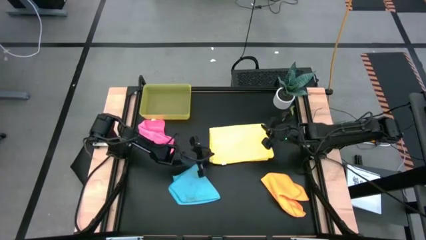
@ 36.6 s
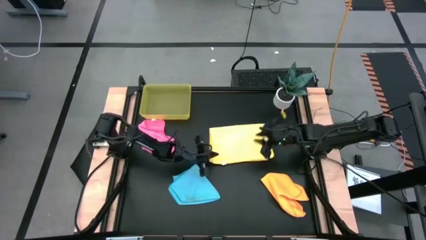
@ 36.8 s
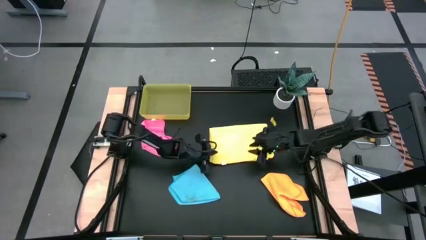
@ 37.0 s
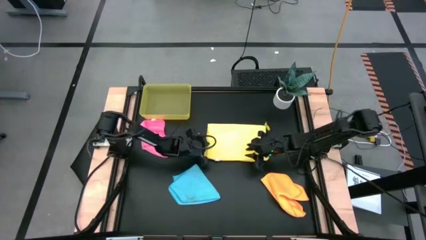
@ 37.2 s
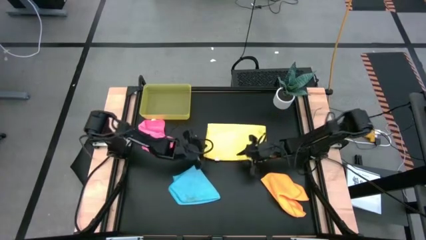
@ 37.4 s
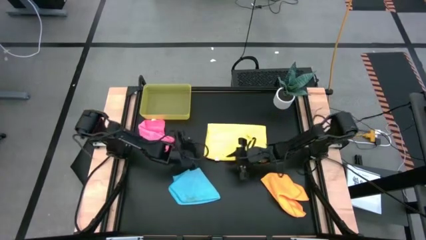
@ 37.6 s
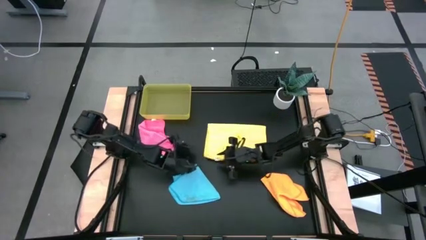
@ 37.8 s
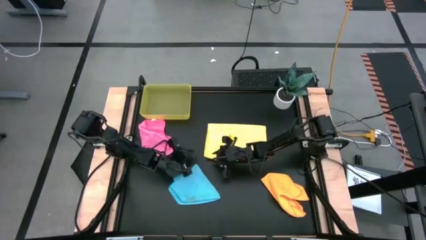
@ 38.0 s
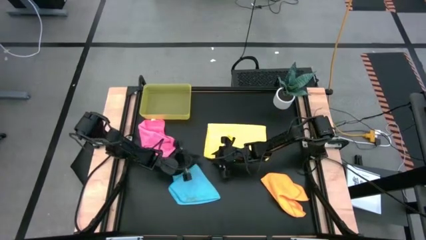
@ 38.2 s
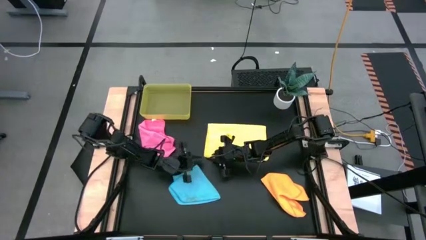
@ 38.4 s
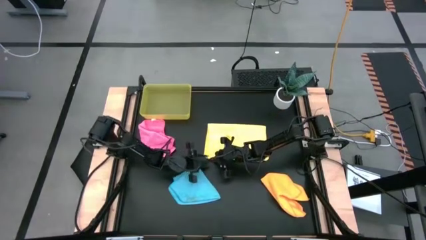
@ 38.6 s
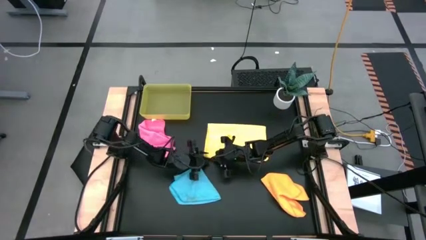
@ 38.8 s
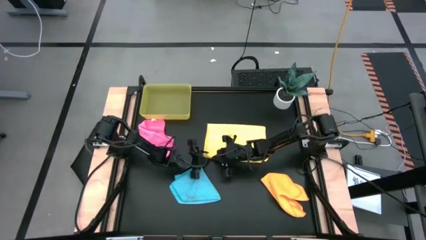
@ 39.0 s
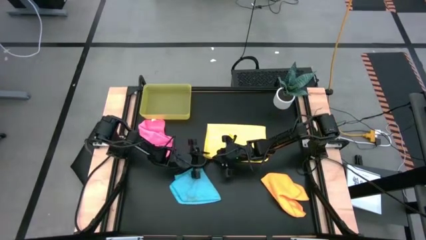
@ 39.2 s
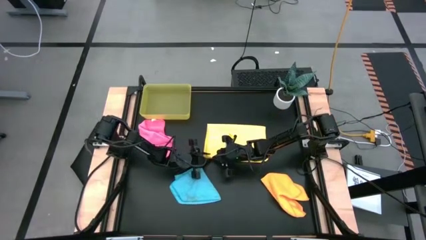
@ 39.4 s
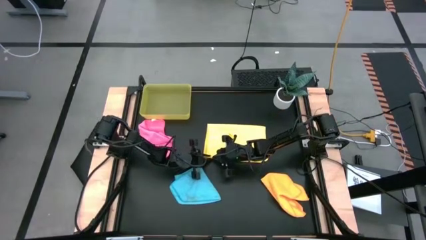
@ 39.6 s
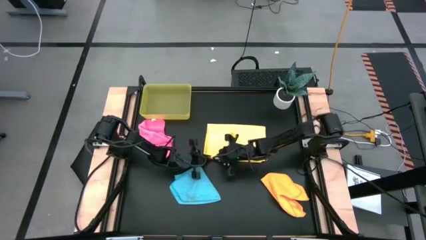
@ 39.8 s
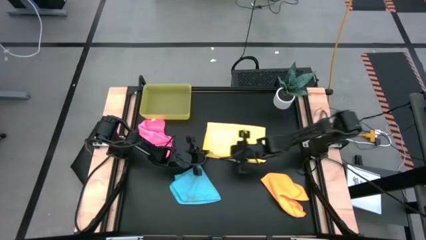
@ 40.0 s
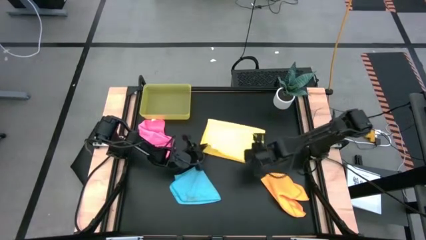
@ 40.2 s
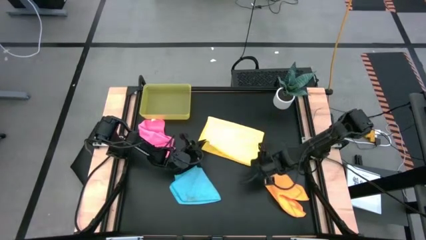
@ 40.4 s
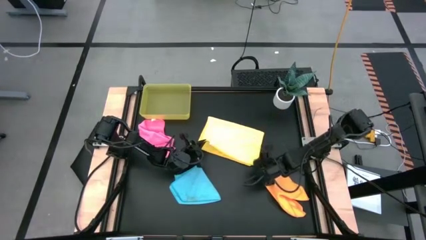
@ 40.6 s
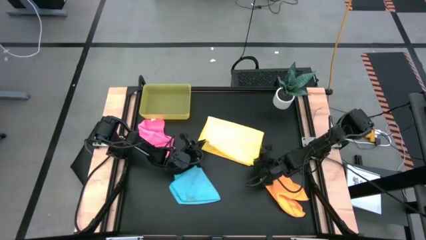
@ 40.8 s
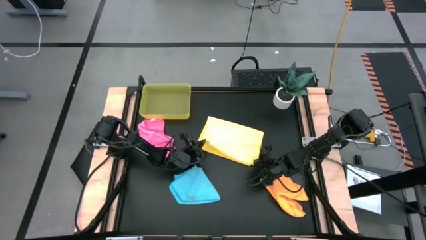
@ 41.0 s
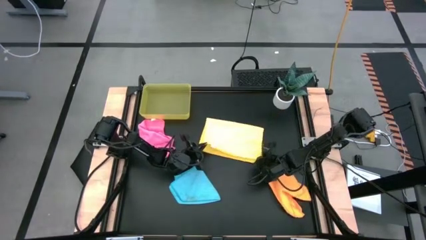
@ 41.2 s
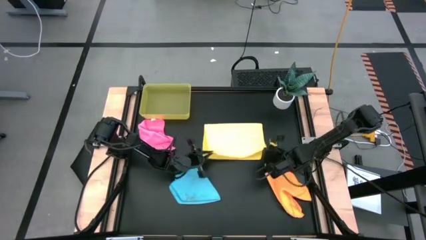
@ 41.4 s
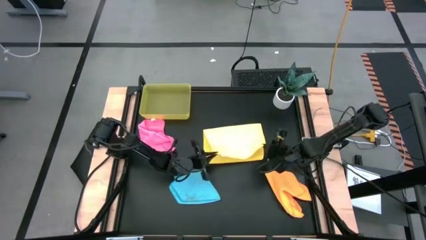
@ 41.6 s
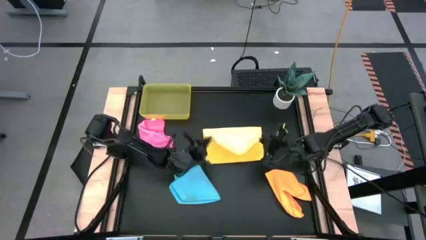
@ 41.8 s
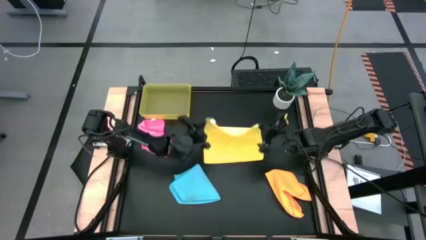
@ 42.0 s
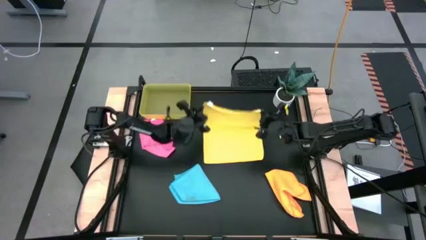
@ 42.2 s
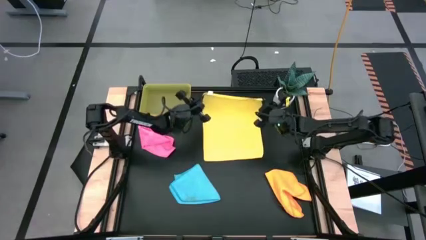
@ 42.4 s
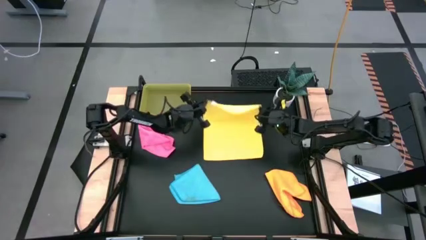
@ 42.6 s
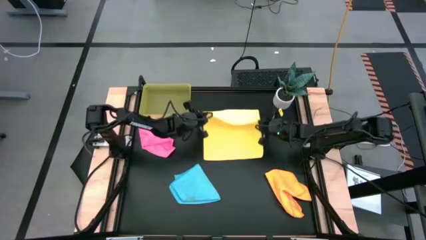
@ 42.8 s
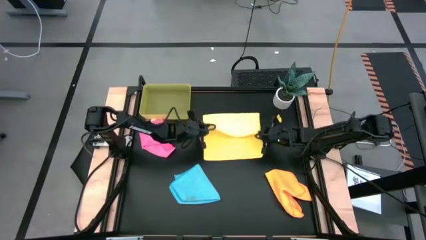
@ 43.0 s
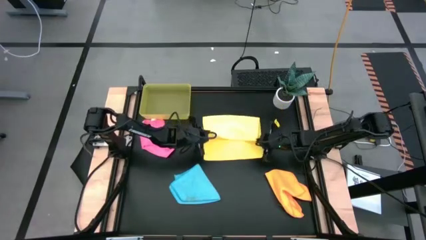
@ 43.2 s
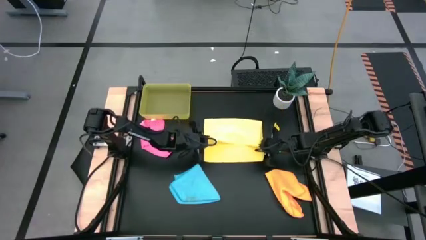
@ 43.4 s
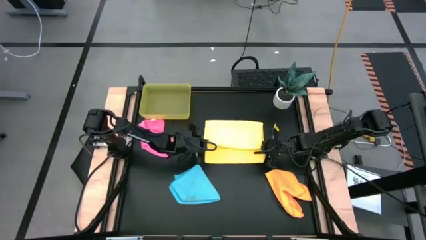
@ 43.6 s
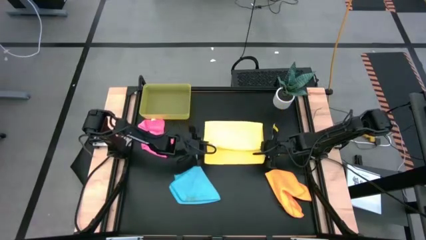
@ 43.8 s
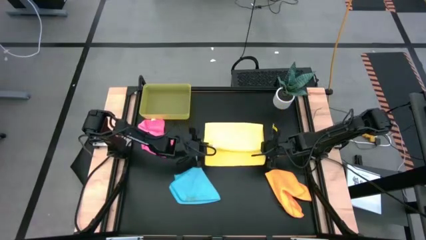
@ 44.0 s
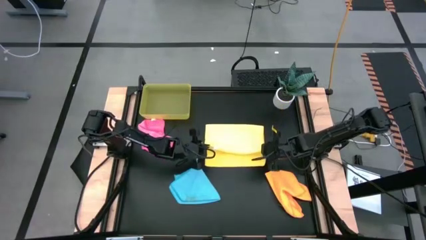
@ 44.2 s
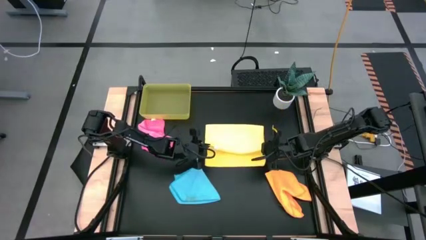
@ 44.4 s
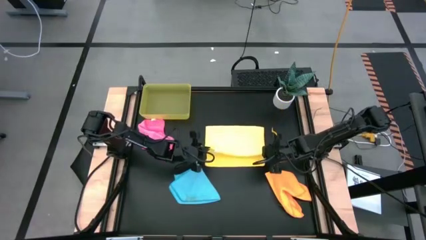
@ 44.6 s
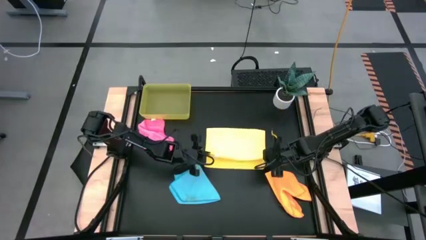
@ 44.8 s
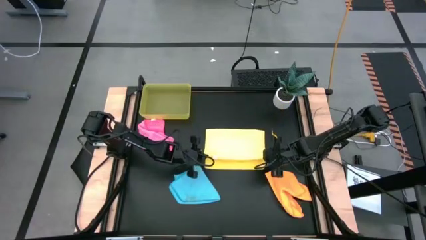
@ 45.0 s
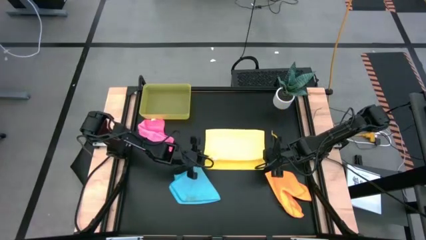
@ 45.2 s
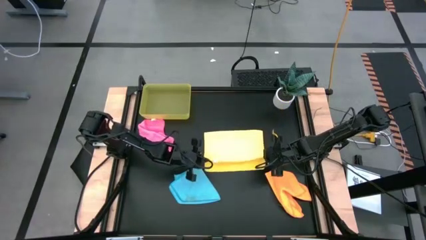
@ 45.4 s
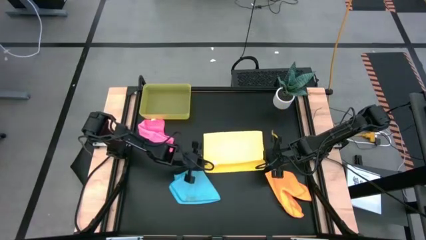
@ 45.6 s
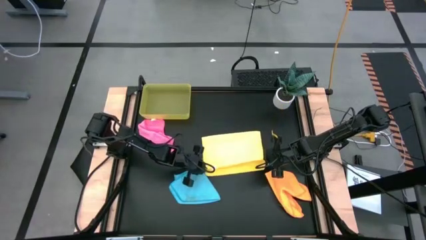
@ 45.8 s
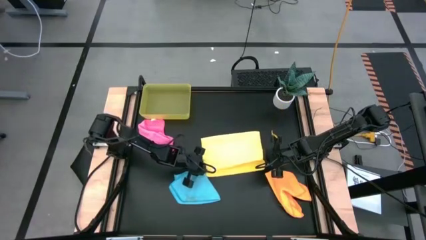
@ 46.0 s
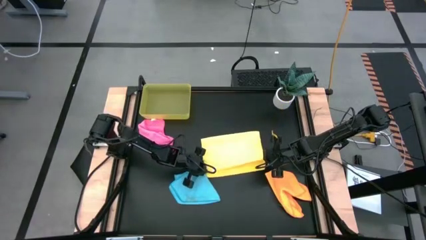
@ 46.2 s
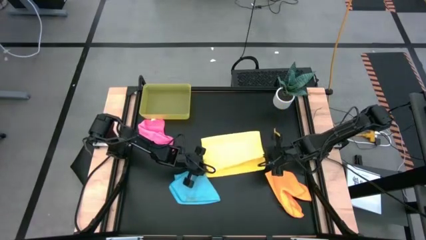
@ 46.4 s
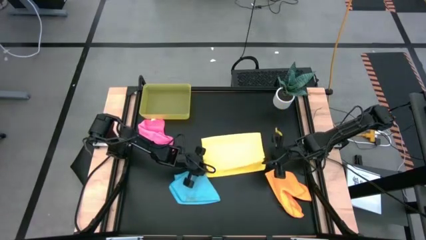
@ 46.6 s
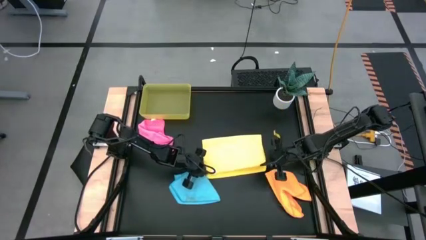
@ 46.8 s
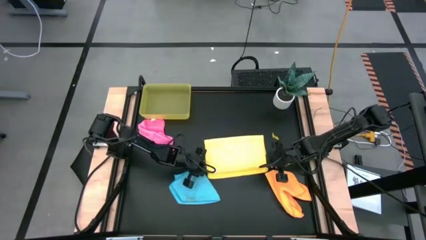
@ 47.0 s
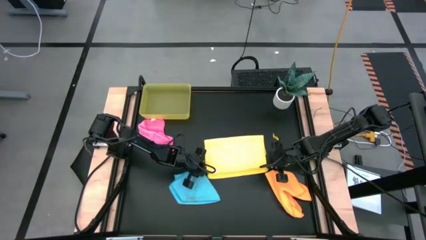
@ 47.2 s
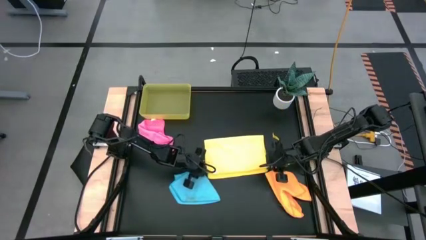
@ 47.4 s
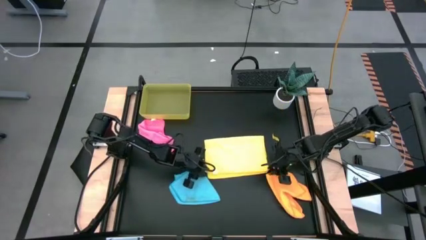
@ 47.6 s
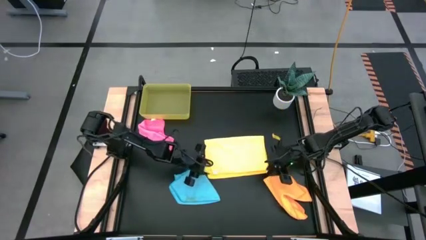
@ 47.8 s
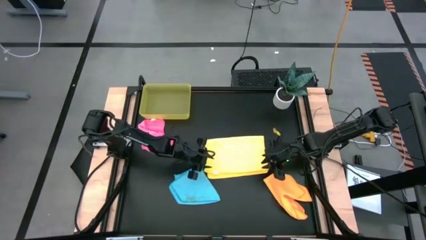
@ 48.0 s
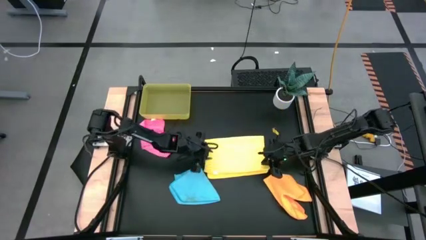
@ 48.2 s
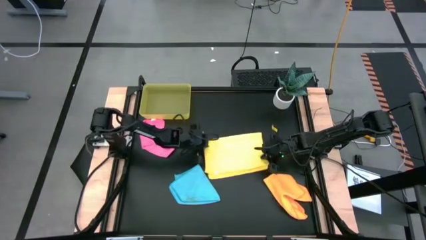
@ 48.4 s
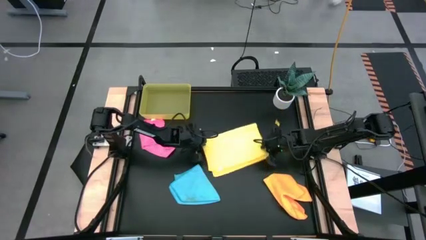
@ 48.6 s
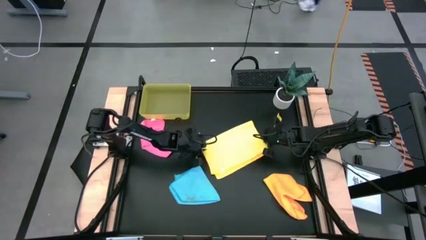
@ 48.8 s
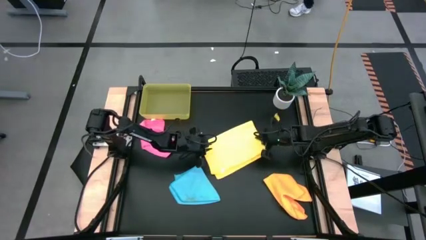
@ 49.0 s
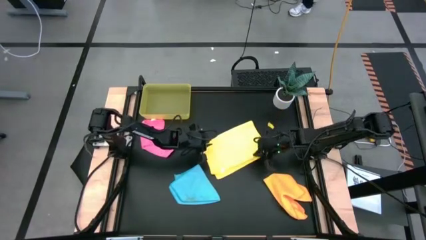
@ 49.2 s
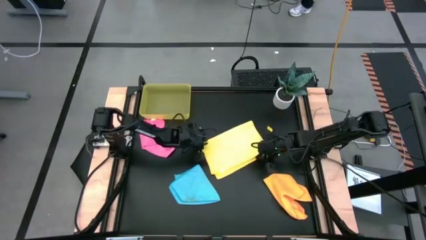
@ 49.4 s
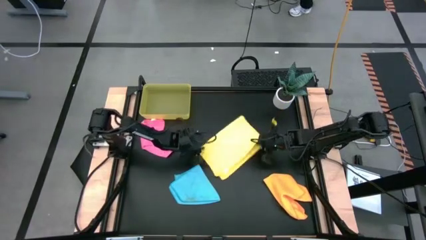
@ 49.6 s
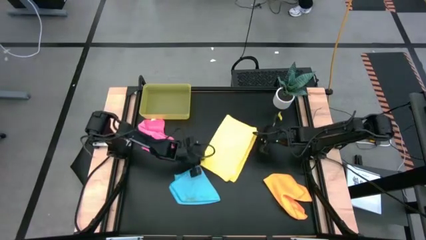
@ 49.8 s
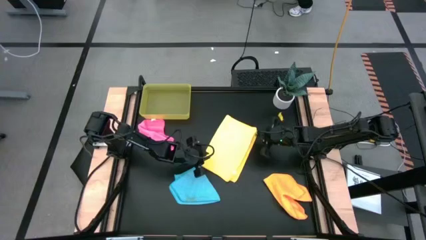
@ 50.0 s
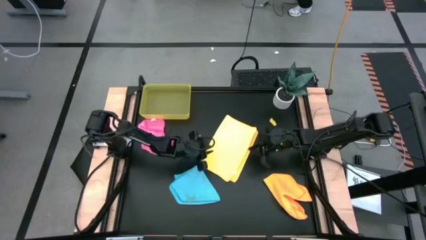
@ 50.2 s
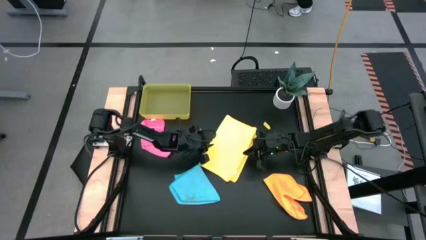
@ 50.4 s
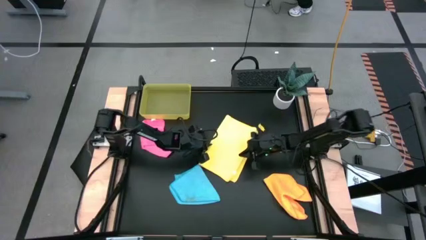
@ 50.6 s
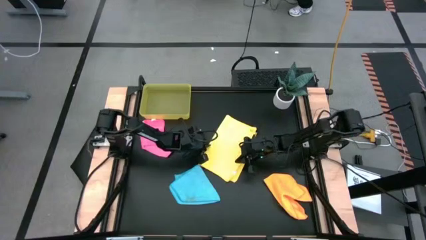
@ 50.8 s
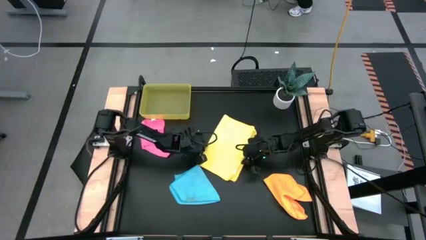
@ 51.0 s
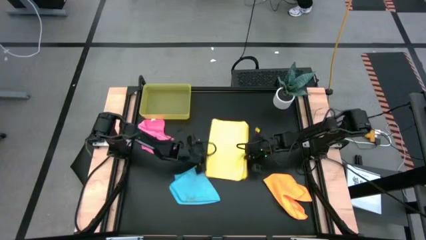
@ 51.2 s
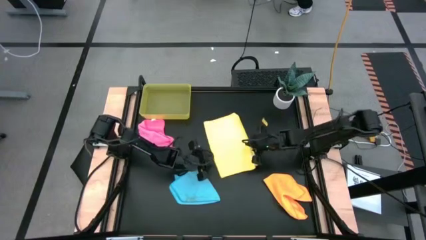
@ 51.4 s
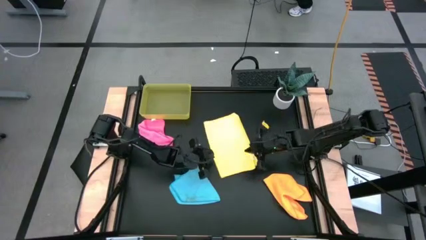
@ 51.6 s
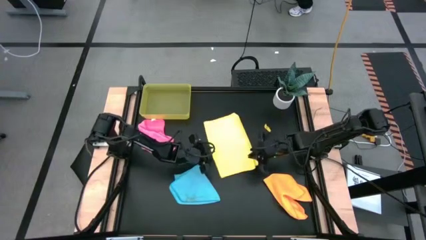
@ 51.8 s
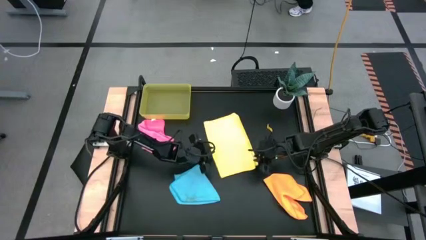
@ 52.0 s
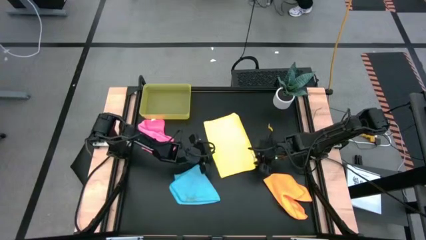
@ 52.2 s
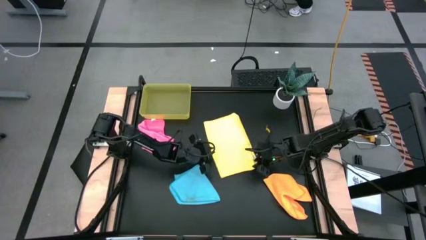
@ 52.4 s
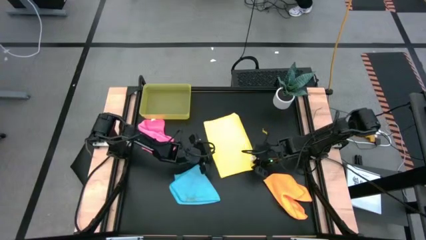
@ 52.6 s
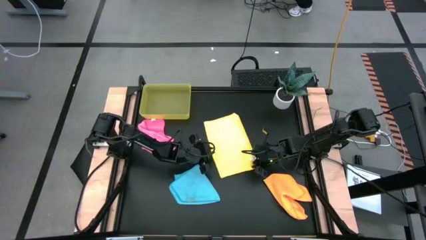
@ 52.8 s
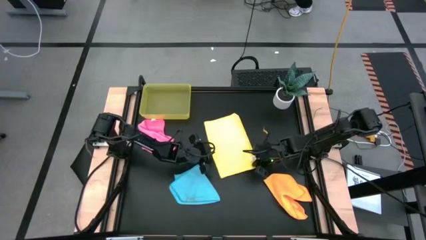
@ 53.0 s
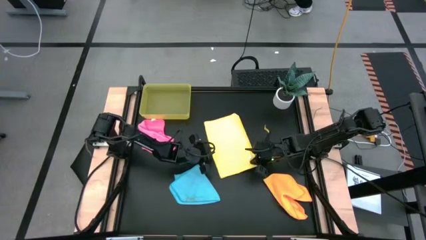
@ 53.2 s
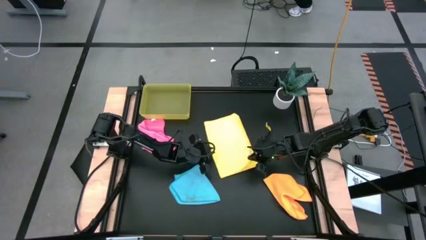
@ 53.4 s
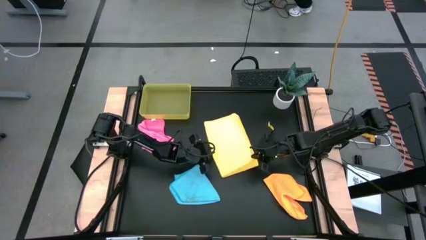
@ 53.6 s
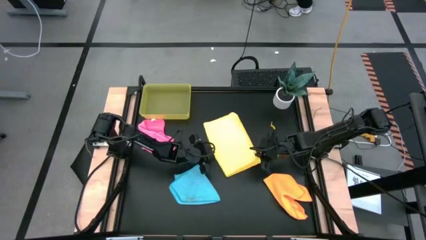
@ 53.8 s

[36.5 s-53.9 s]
Task: Fold microfiber towels
Fold the yellow microfiber cloth
